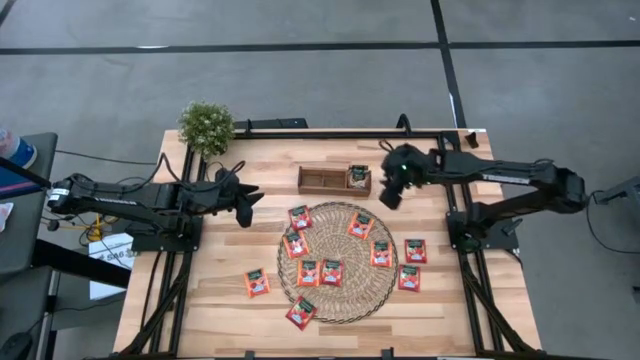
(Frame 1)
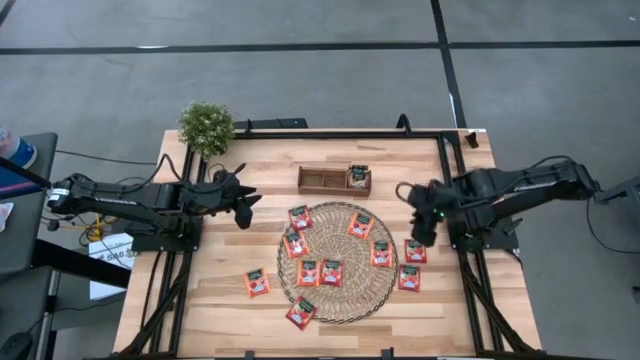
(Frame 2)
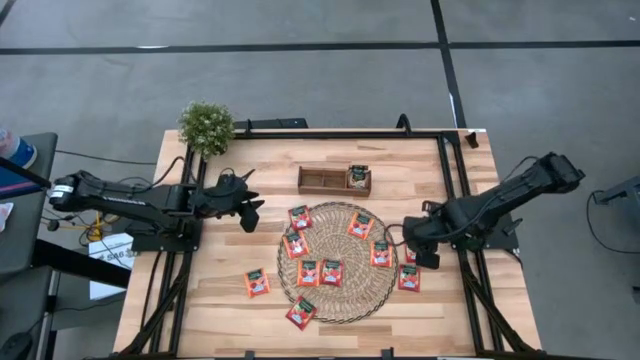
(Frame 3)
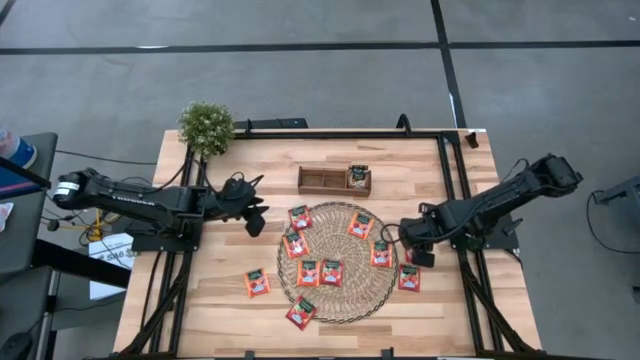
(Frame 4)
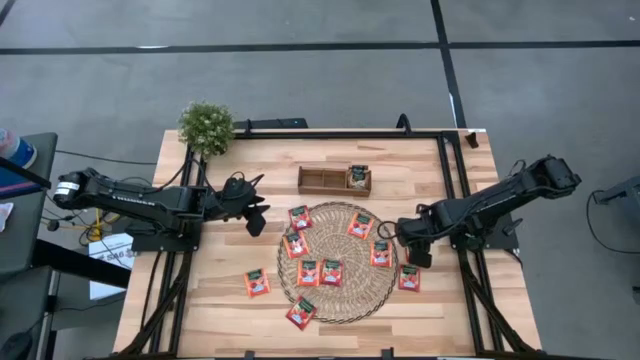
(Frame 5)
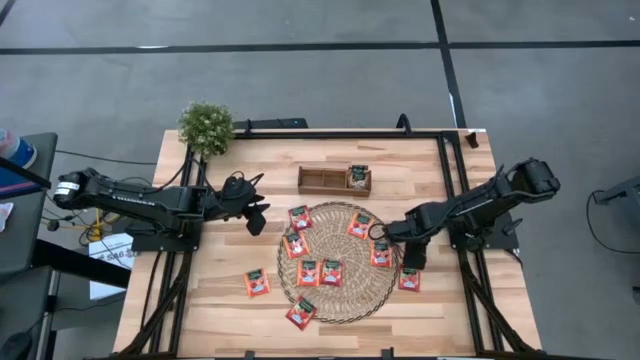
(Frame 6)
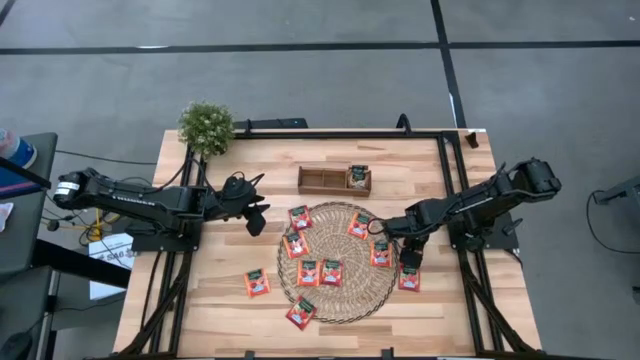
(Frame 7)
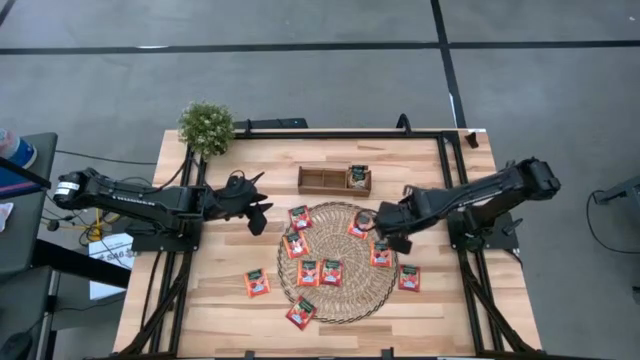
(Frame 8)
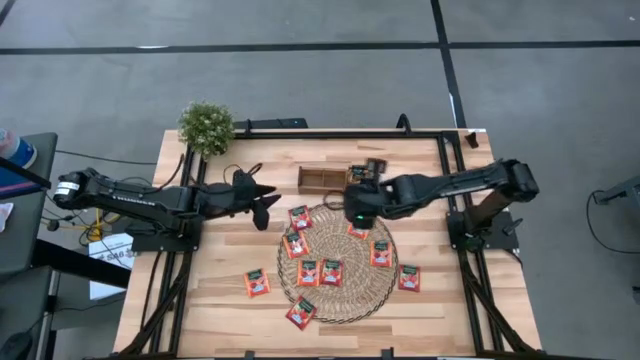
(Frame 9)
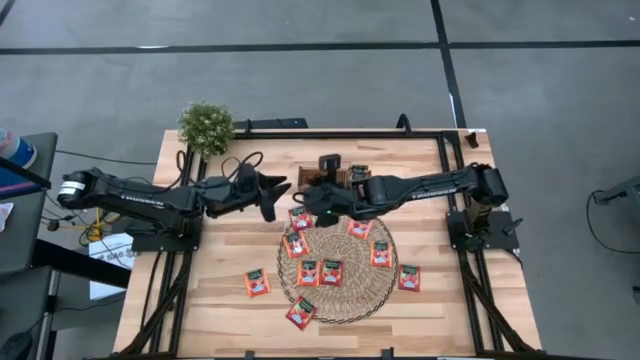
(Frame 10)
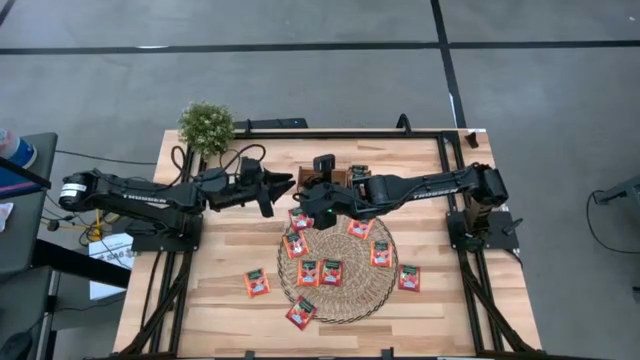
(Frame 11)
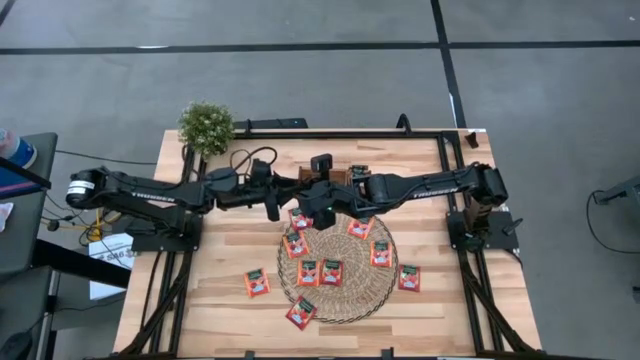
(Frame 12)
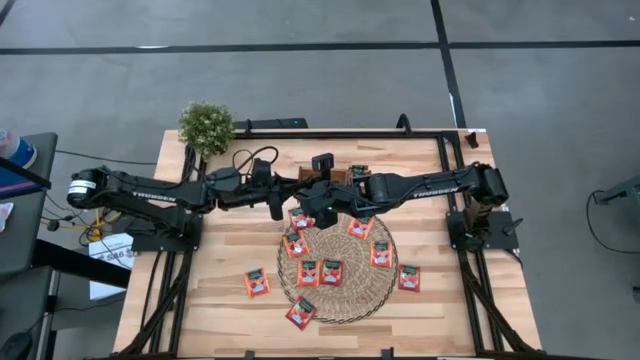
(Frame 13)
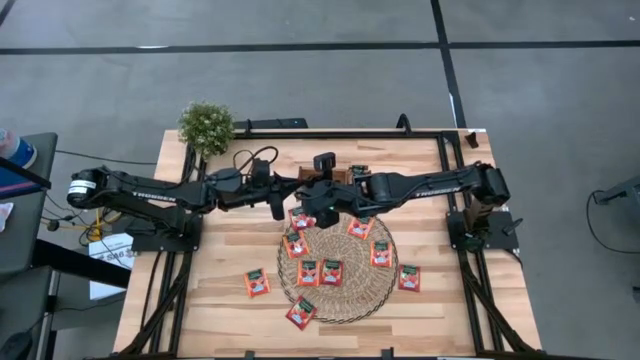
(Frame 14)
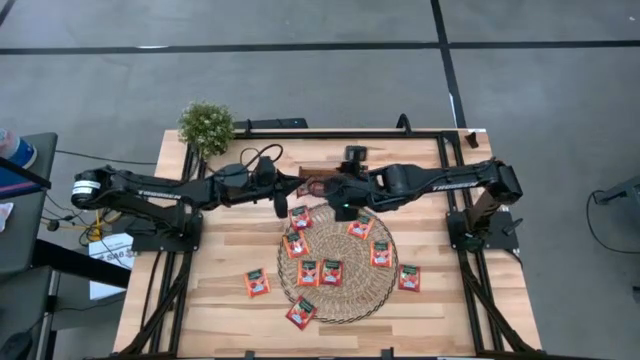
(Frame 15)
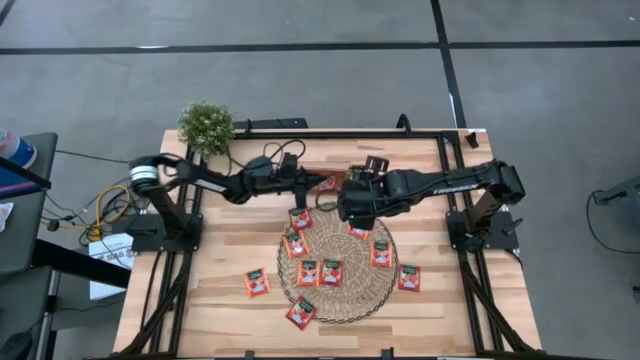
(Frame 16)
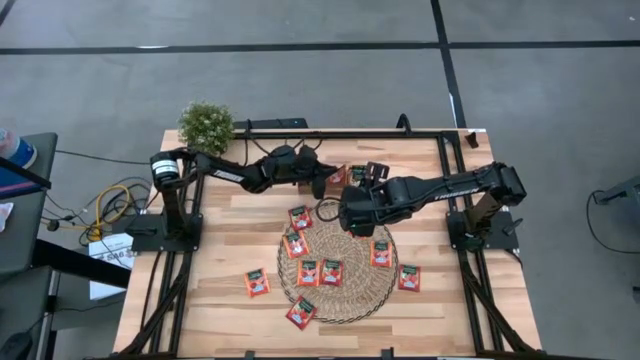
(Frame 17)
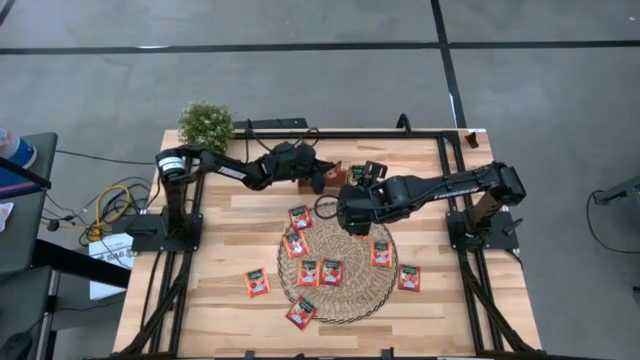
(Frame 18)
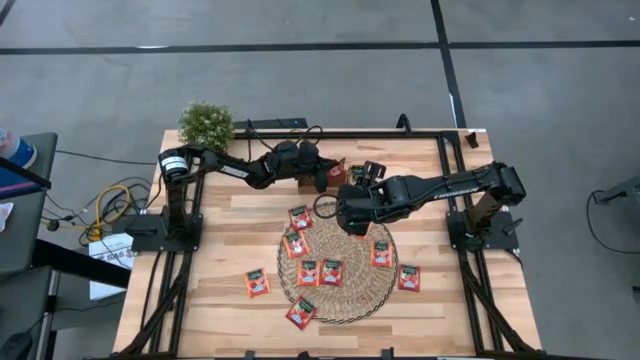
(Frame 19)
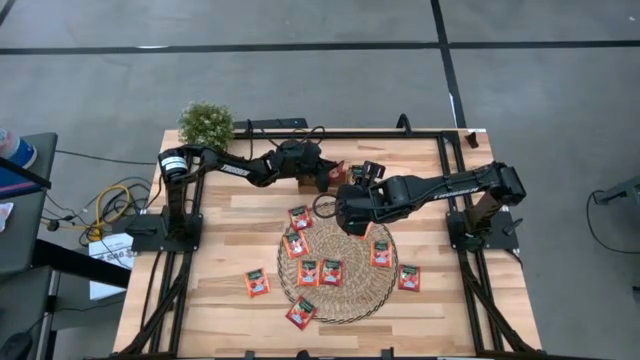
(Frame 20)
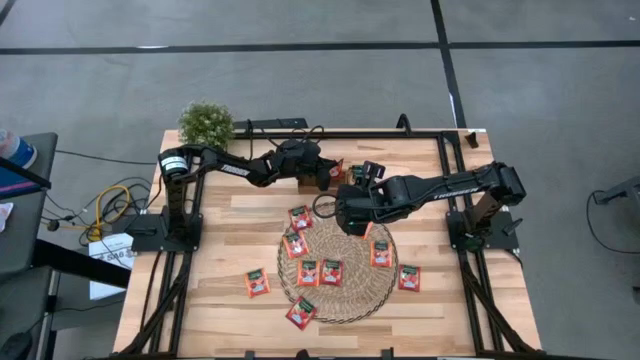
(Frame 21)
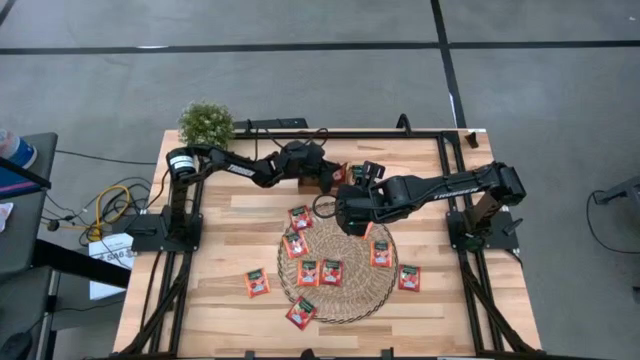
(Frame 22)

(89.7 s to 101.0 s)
Task: Pick & Place Tea
Put the red tea bag into the middle section of the wooden organizer

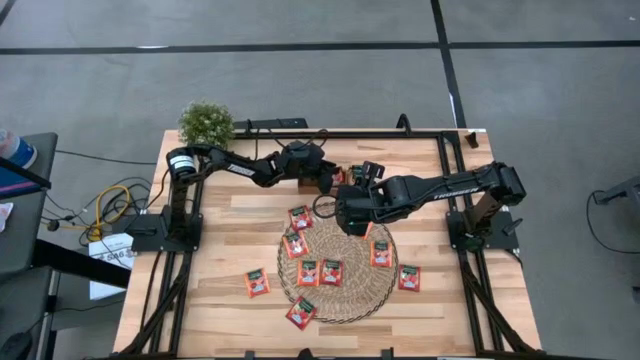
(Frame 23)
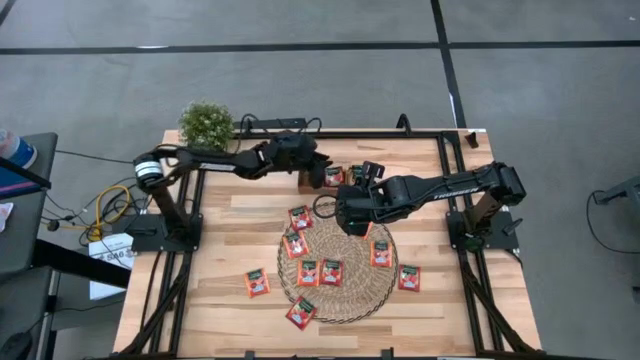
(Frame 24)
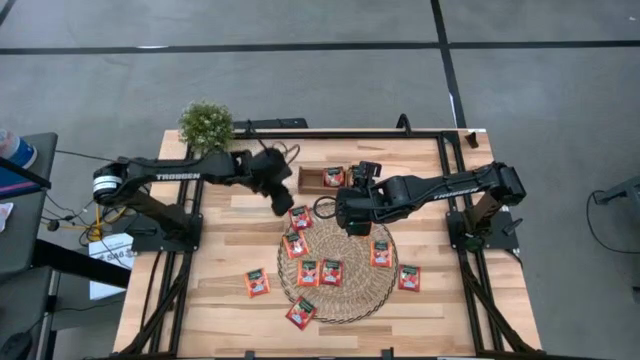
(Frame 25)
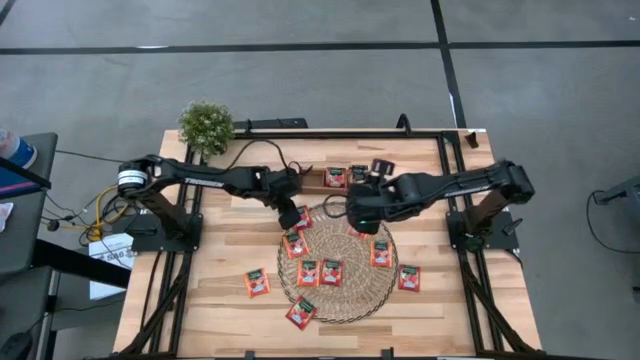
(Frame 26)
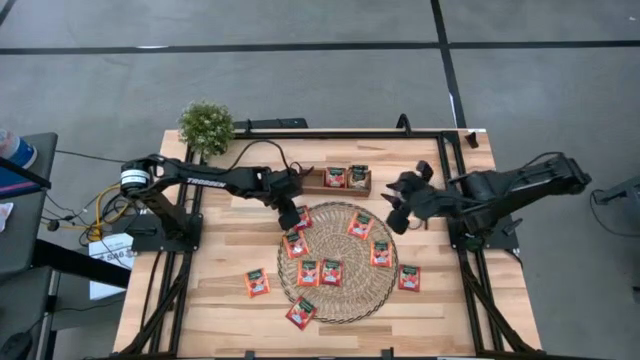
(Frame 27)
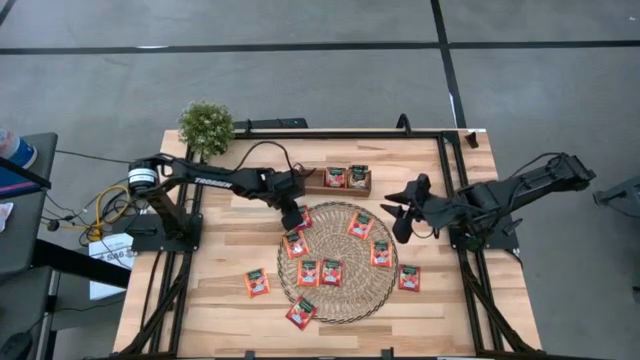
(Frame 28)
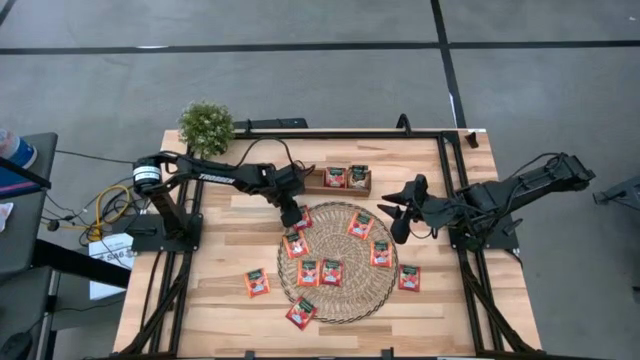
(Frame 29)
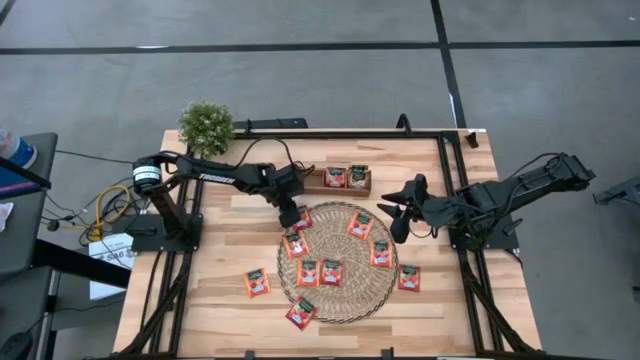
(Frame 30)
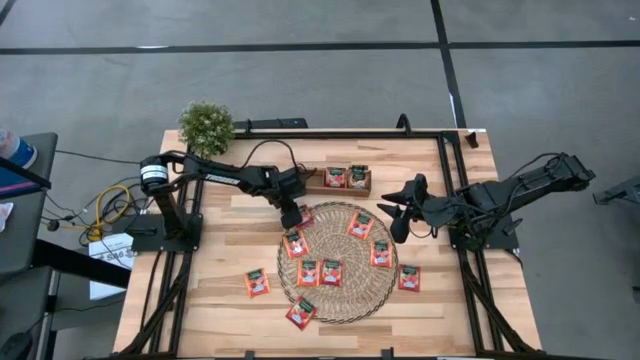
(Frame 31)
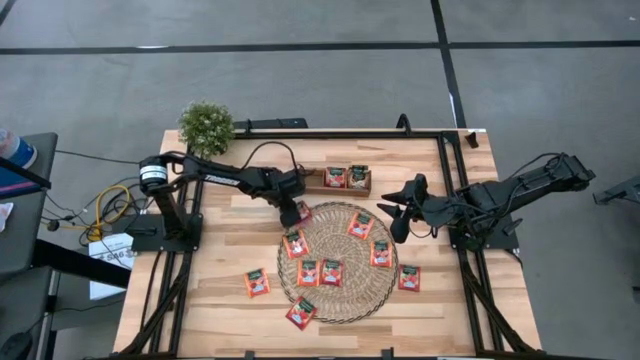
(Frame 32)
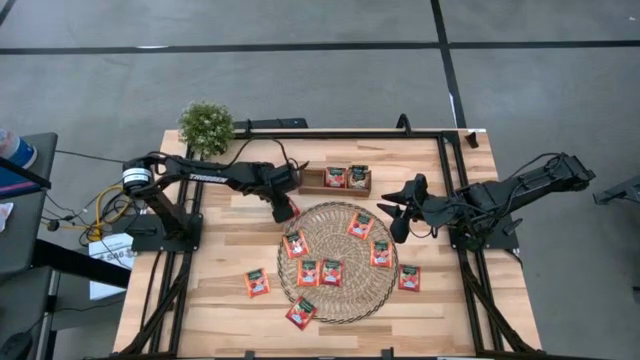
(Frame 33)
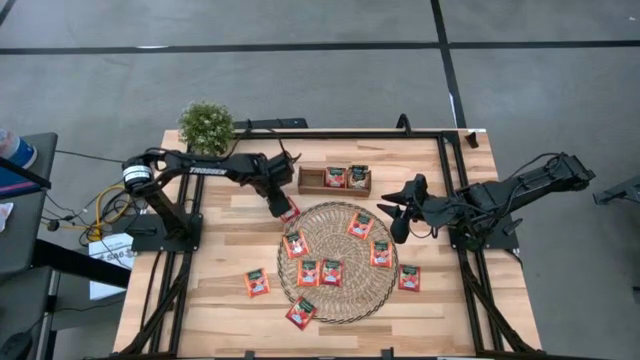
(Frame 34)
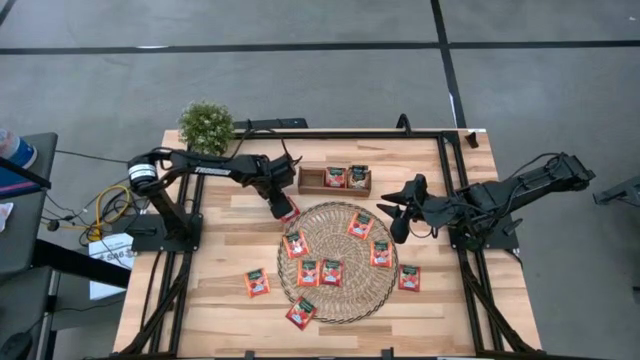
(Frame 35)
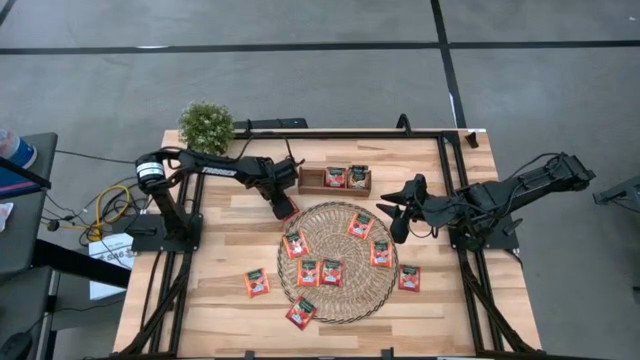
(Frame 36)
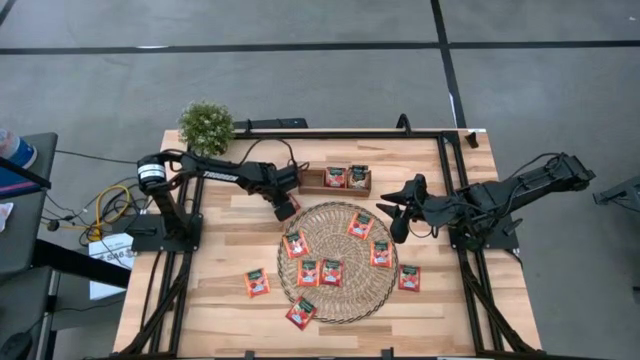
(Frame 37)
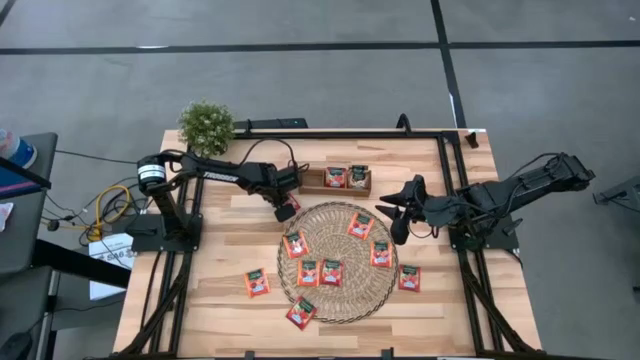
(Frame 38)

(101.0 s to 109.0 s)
Put the red tea bag into the middle section of the wooden organizer

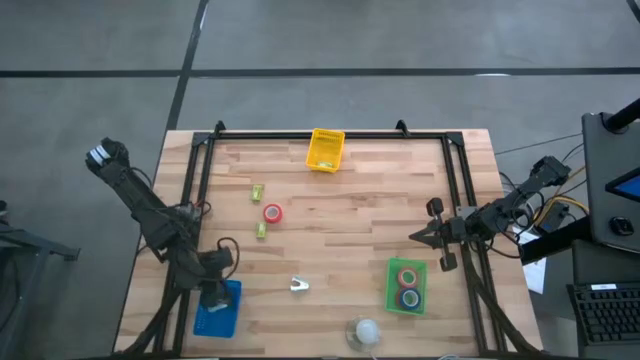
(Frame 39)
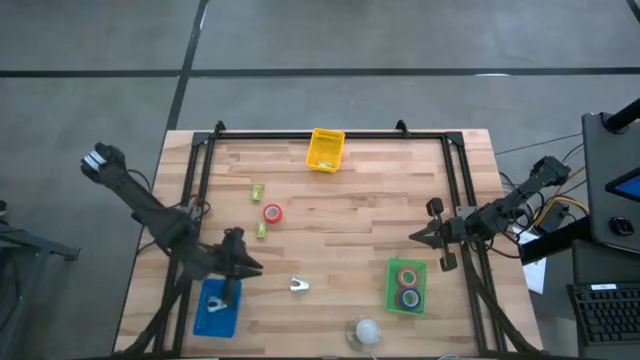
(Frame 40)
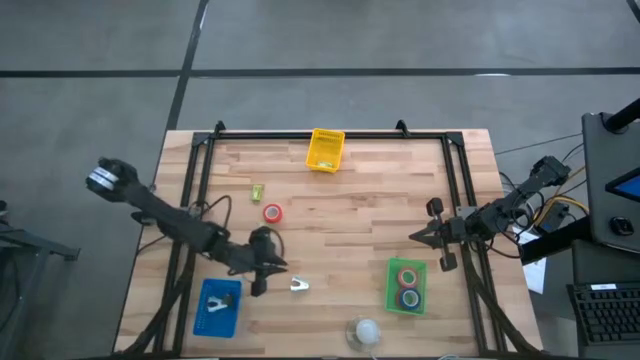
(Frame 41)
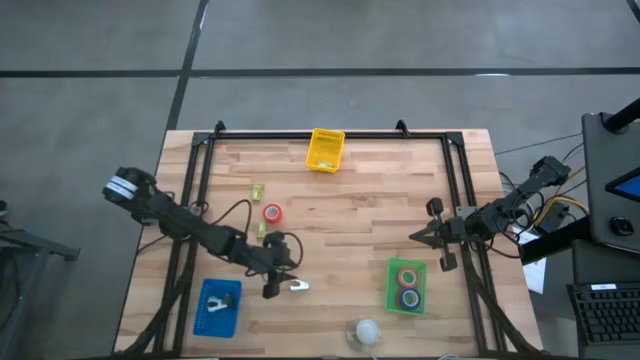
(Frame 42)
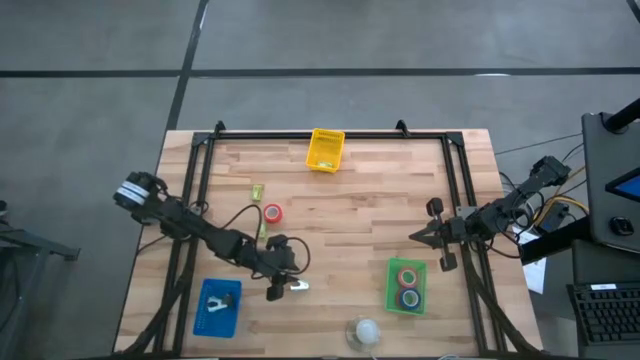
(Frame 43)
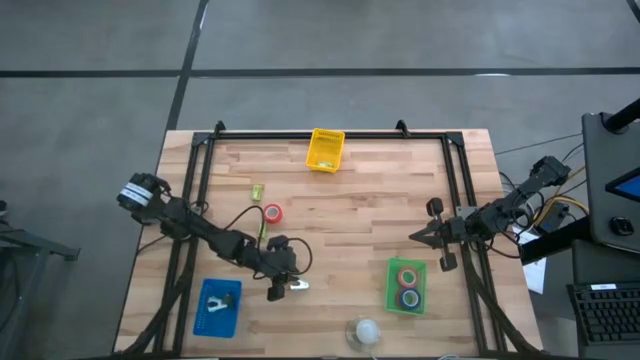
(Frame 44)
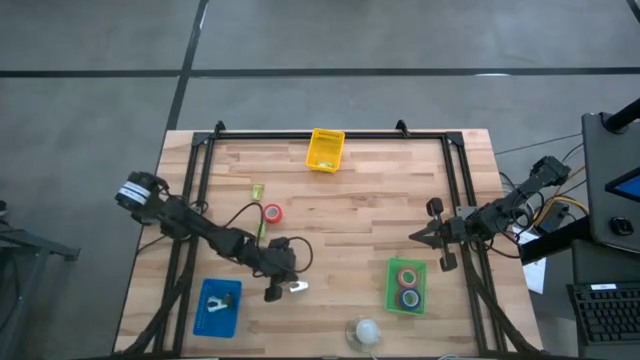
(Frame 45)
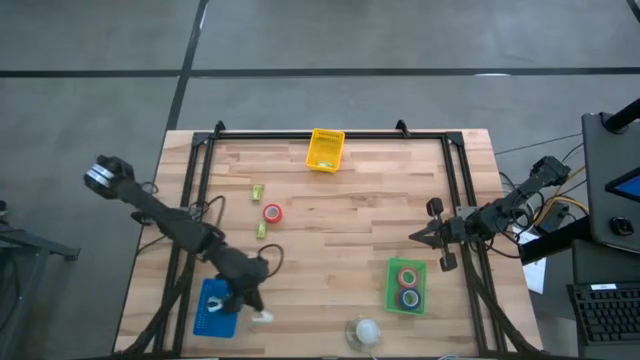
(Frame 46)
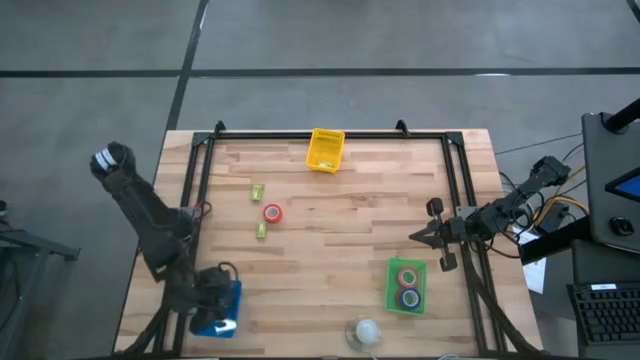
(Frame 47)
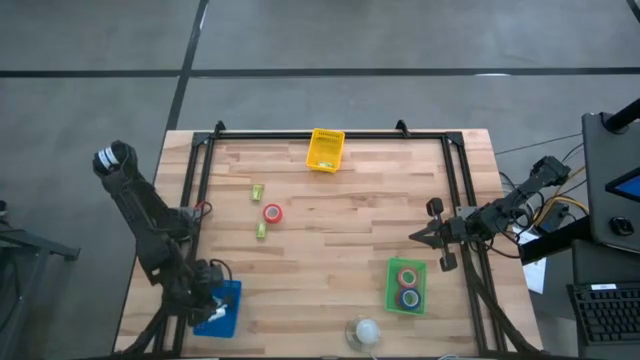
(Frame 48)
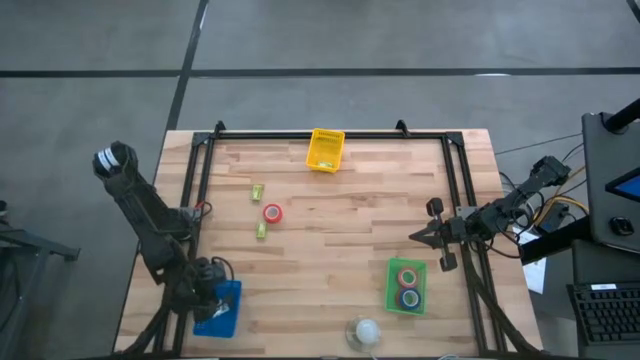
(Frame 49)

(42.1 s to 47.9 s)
Task: Pick and place Stapler, Stapler remover, tape
Put the blue staple remover into the blue bin
